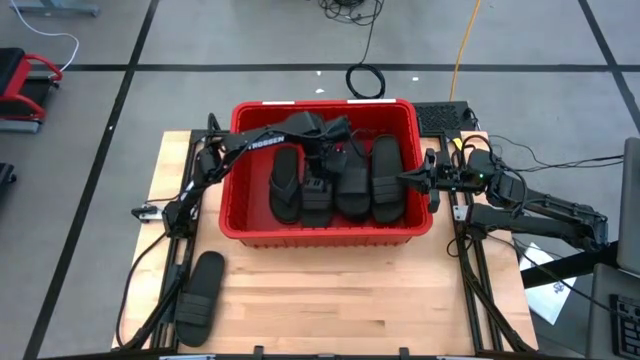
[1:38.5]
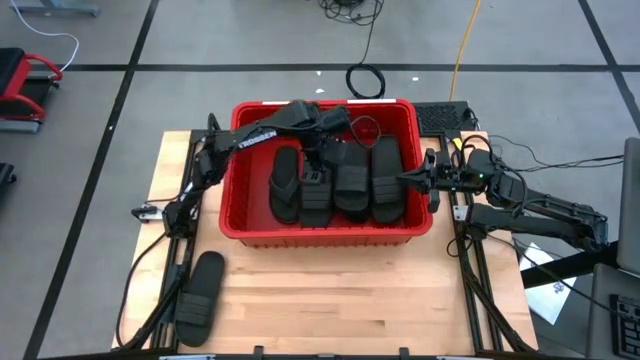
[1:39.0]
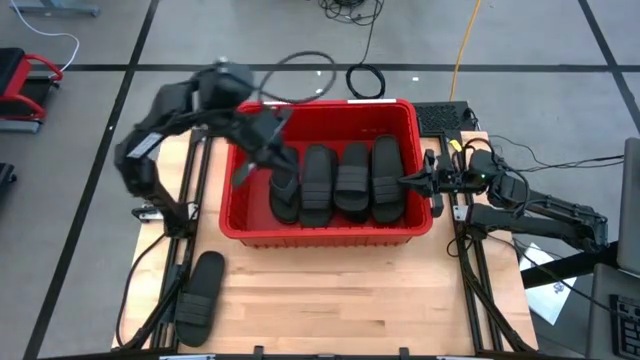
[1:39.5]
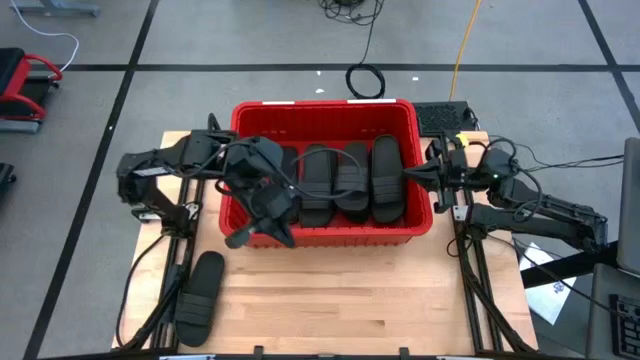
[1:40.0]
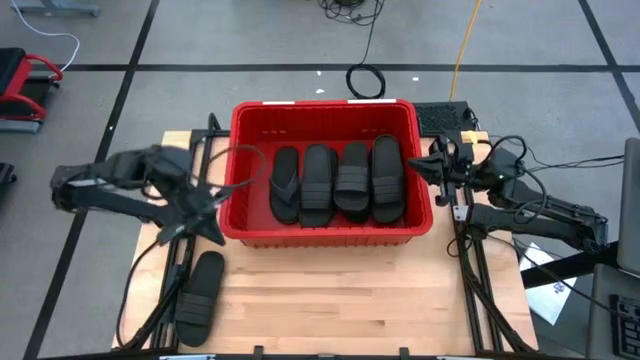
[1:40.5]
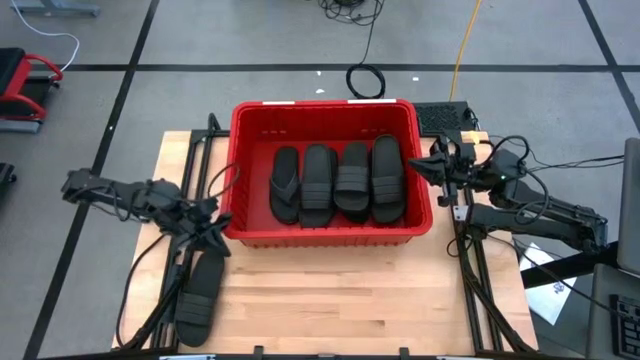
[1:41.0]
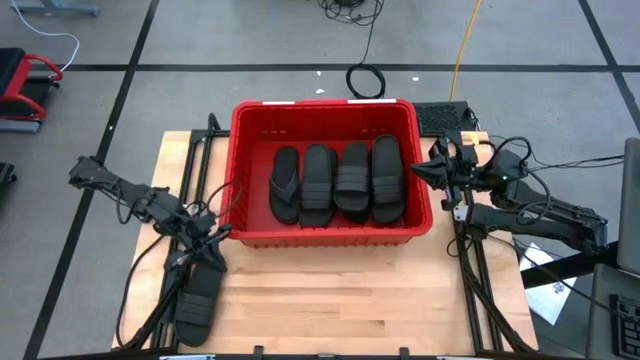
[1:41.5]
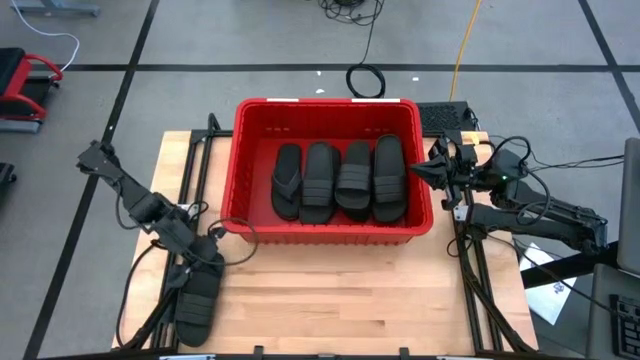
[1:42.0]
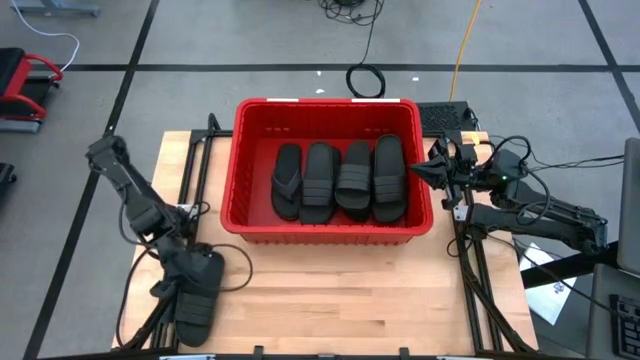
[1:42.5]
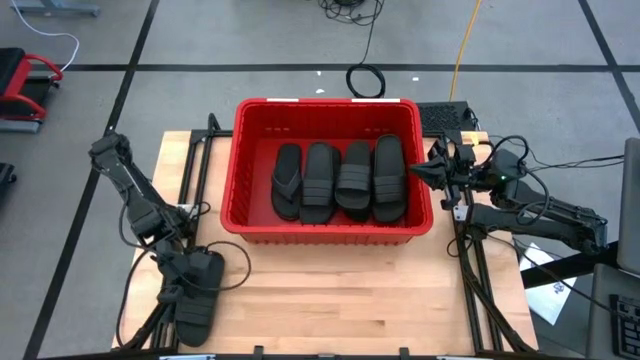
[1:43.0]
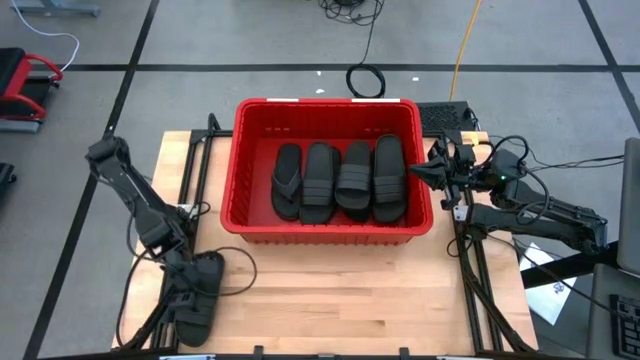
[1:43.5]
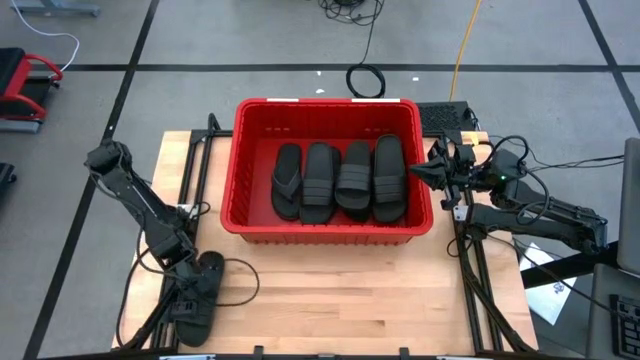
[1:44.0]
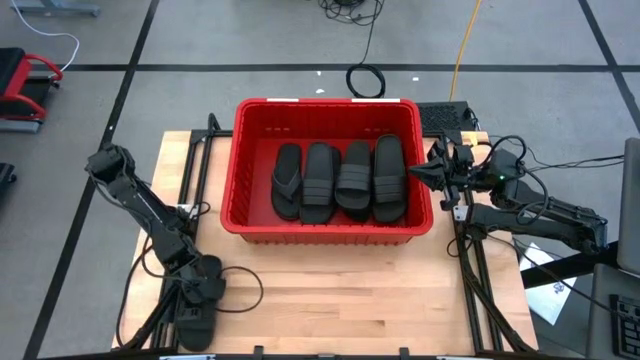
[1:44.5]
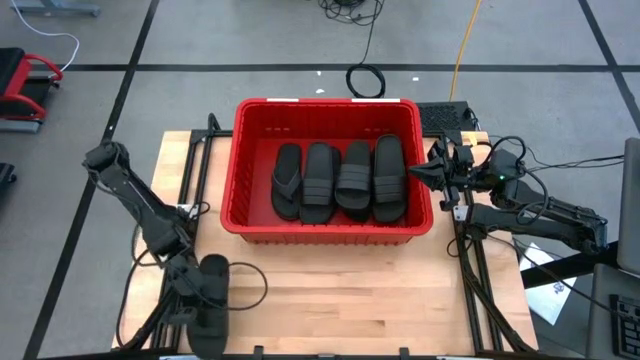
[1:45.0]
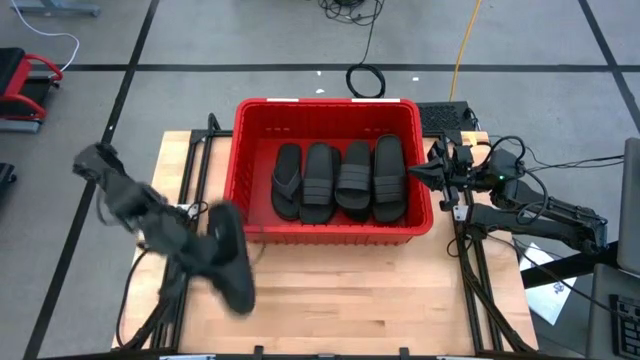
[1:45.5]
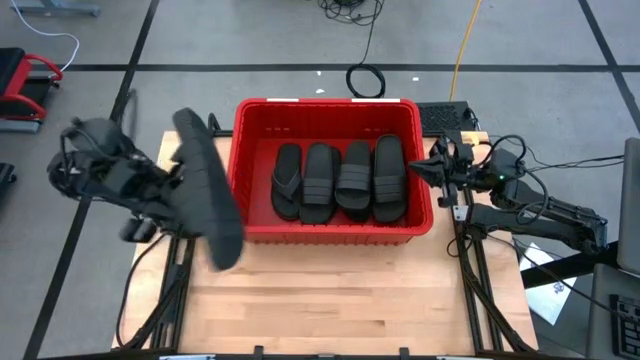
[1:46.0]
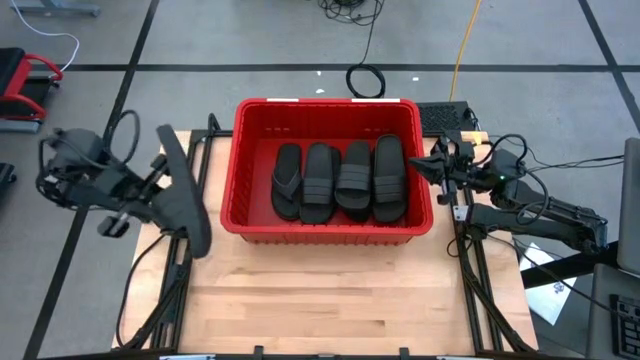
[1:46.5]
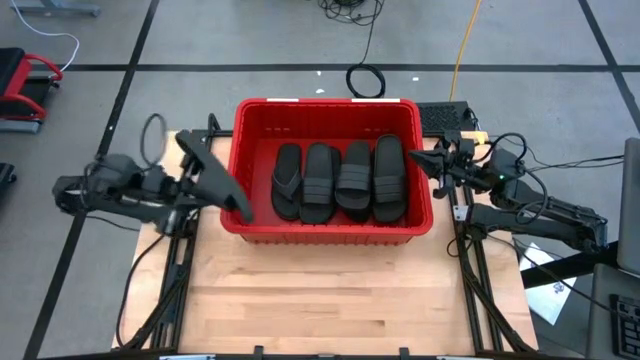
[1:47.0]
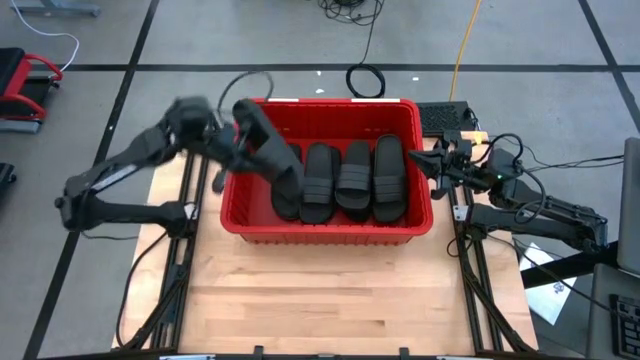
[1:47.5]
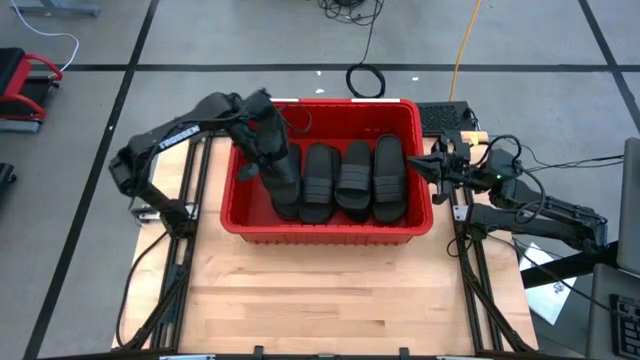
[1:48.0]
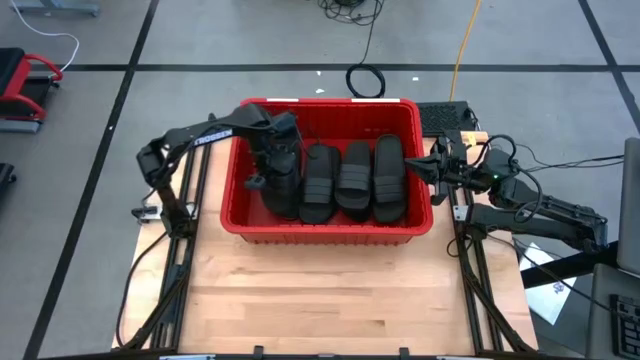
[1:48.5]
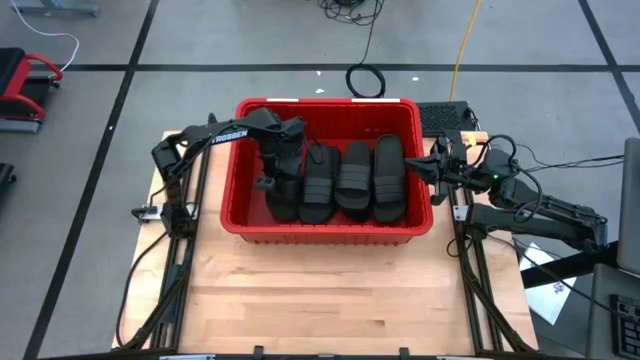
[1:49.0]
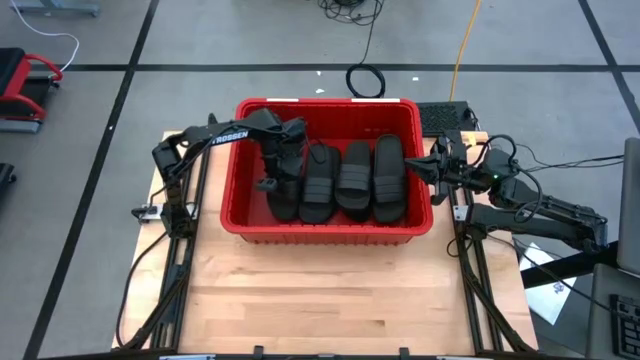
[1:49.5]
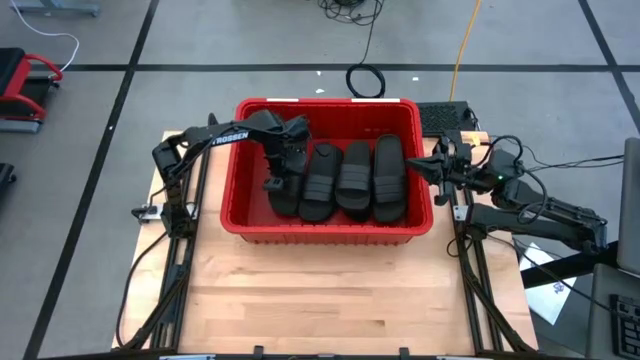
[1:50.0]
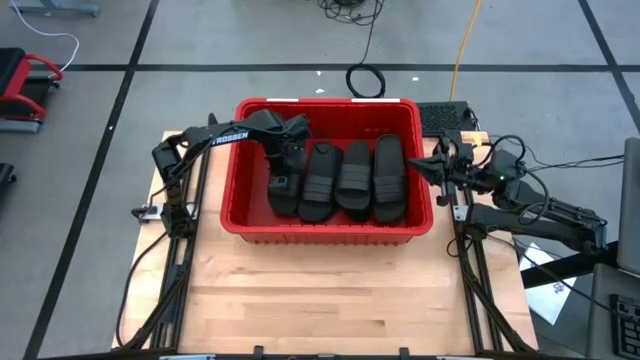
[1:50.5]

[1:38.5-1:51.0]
Task: Pick and place slides into bin
Put the slide into the bin

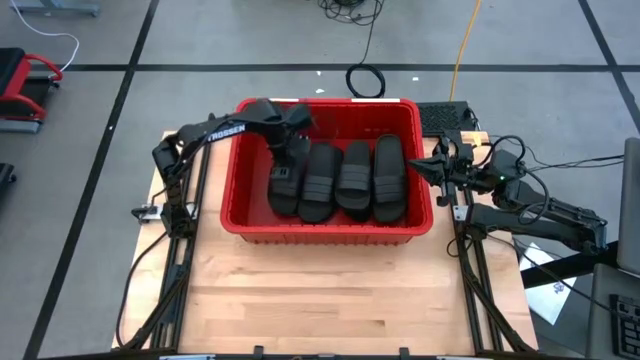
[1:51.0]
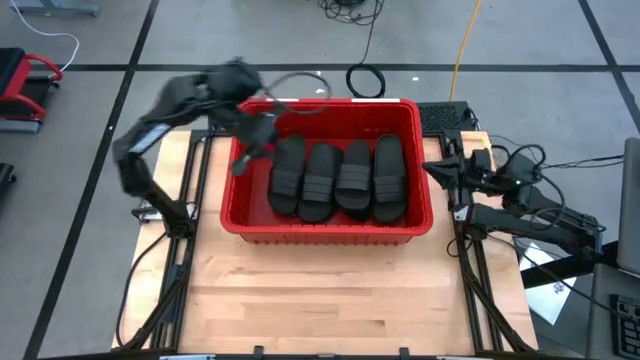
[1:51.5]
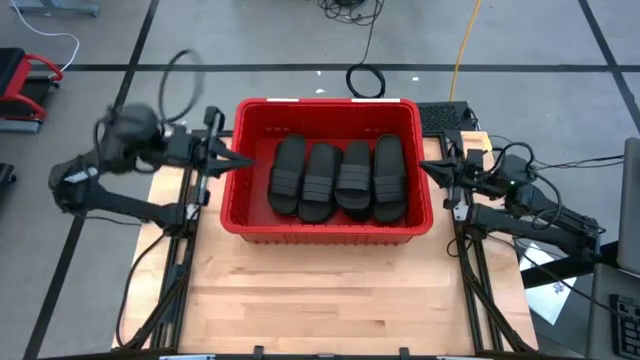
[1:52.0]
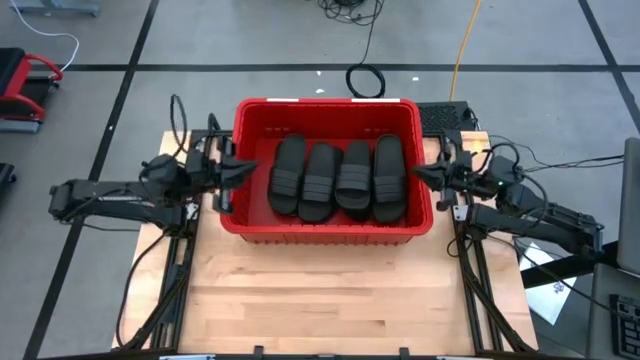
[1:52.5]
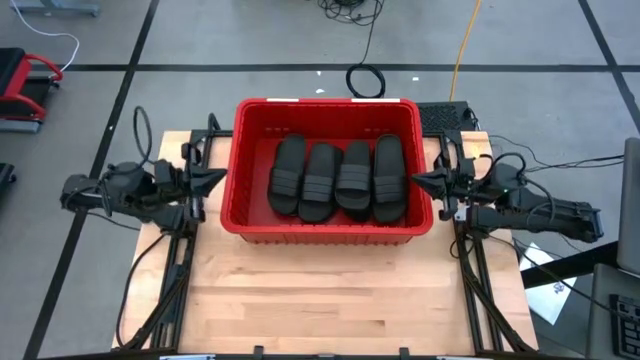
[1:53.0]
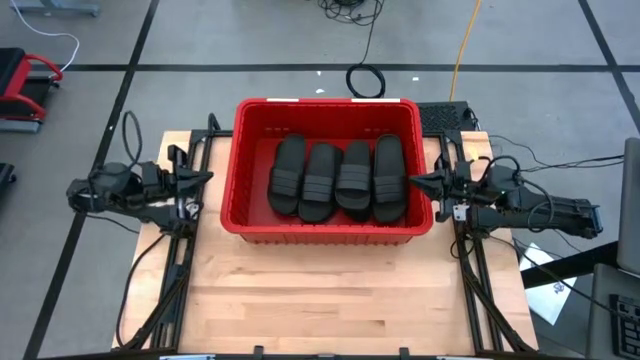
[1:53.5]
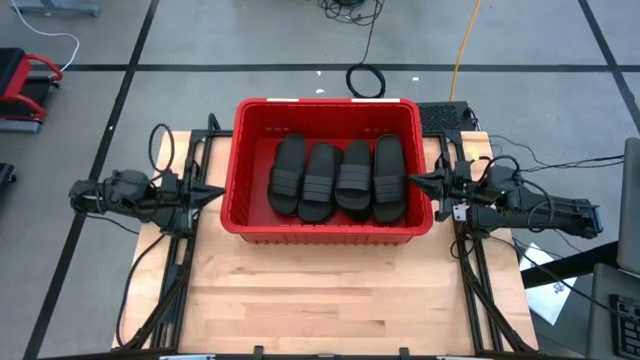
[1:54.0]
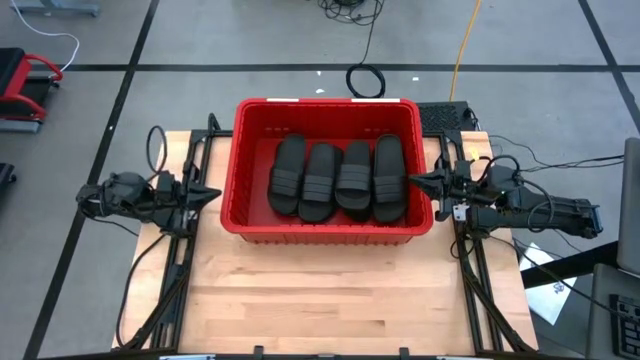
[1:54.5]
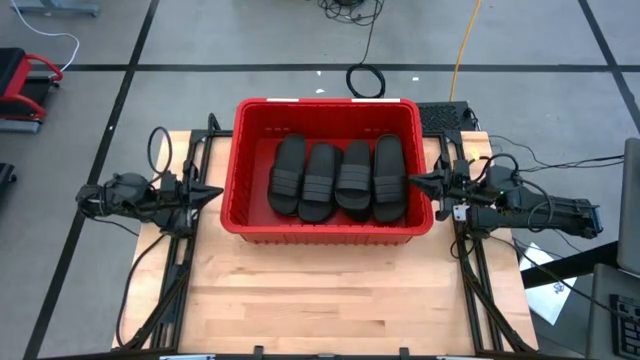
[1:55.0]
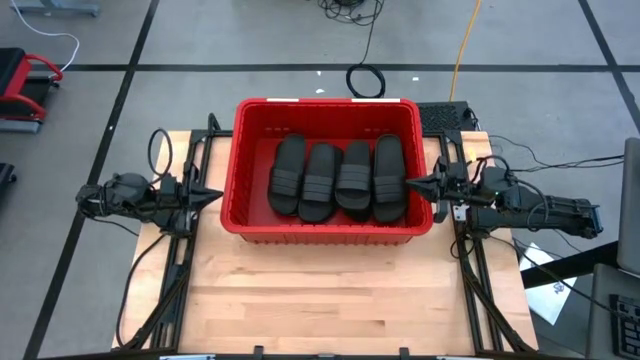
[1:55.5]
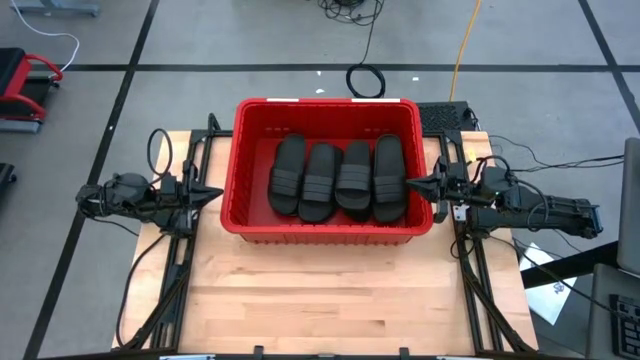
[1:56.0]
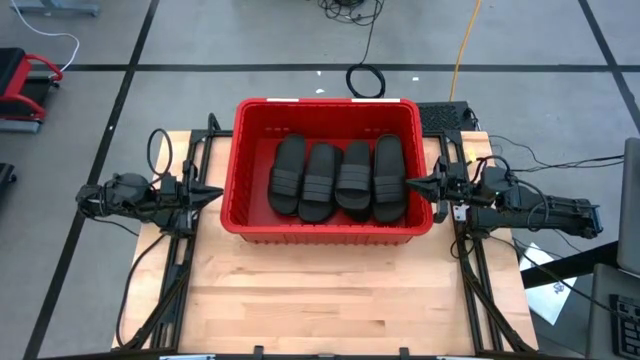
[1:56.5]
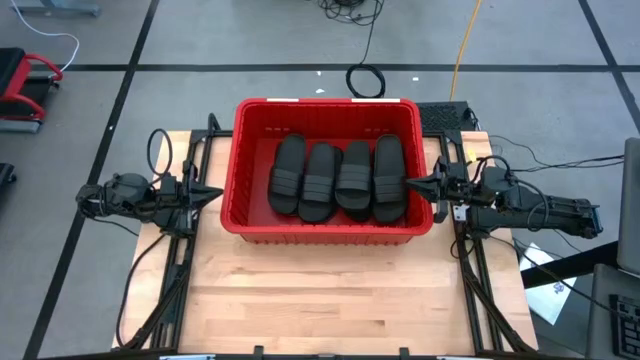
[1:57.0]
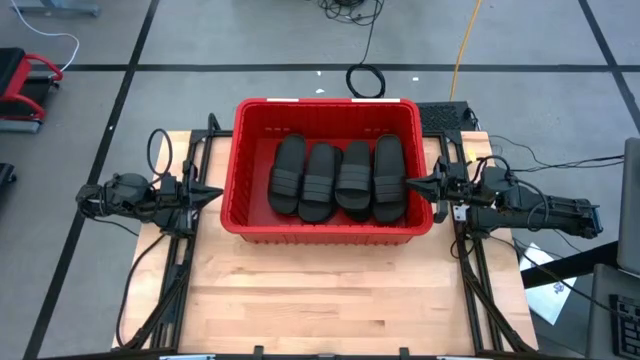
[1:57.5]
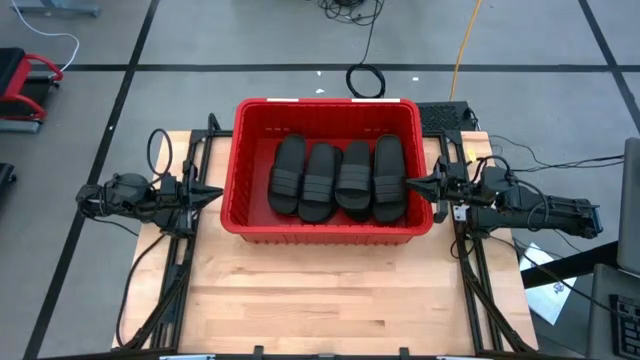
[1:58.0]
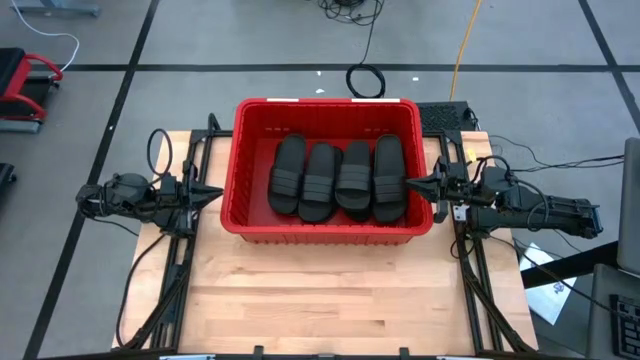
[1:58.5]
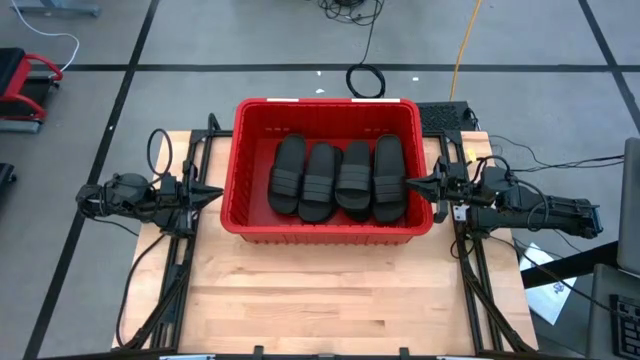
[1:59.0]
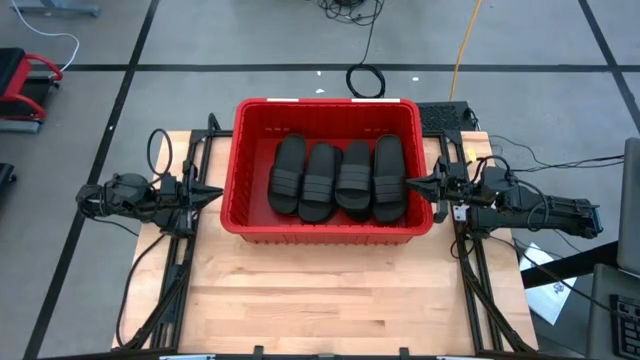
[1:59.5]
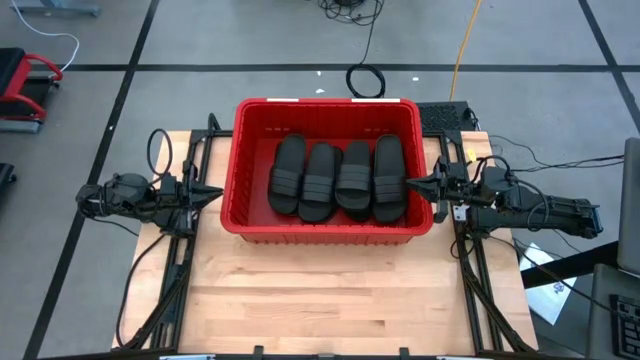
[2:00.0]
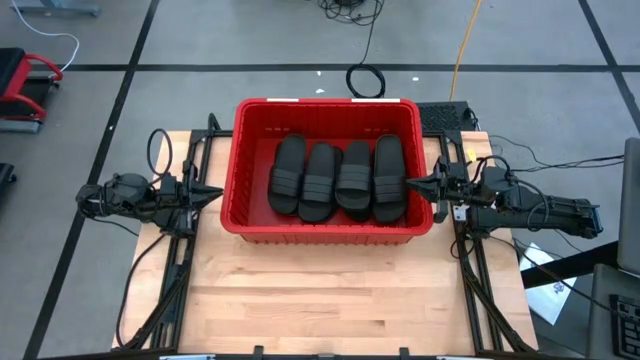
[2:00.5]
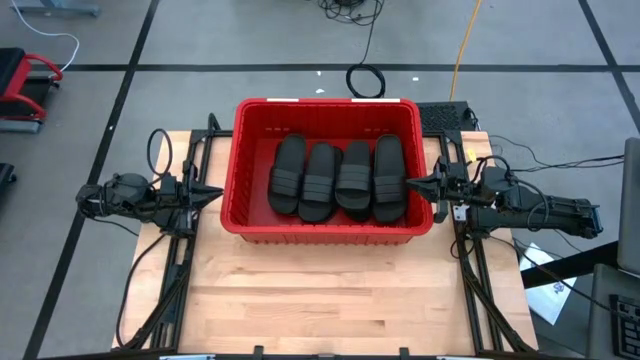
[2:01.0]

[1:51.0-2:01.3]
Return to Home Position
